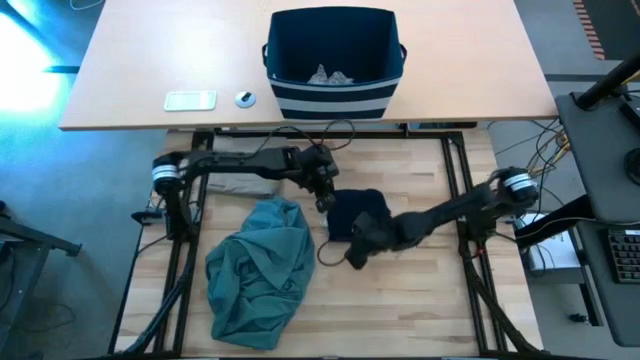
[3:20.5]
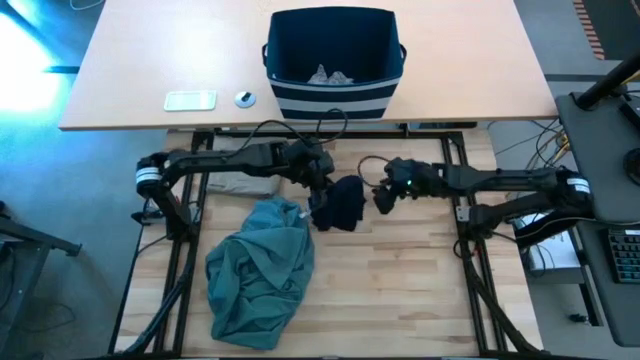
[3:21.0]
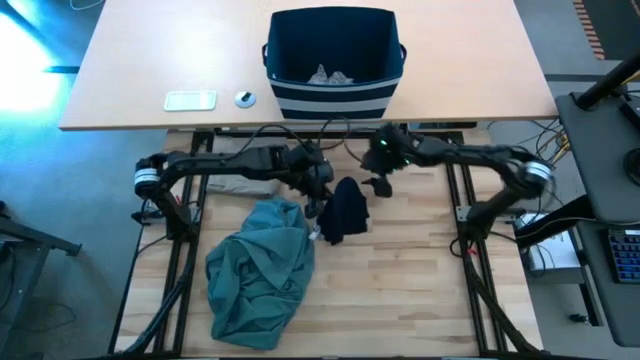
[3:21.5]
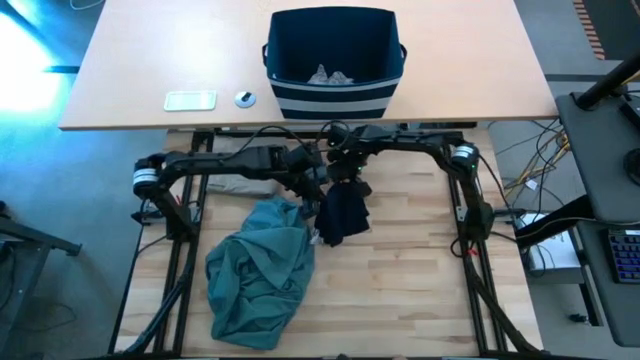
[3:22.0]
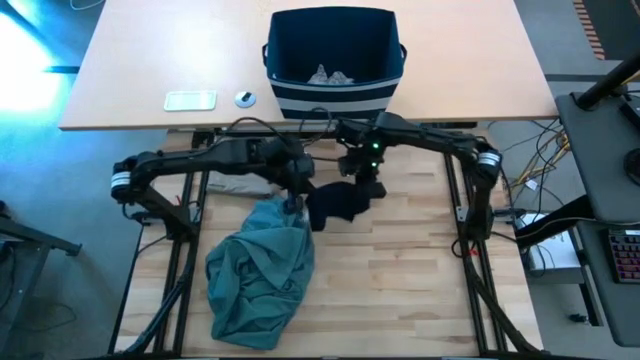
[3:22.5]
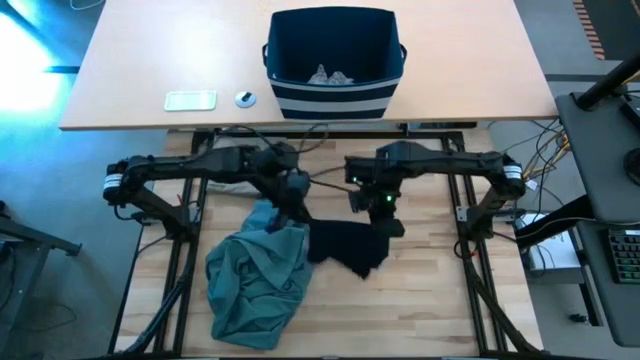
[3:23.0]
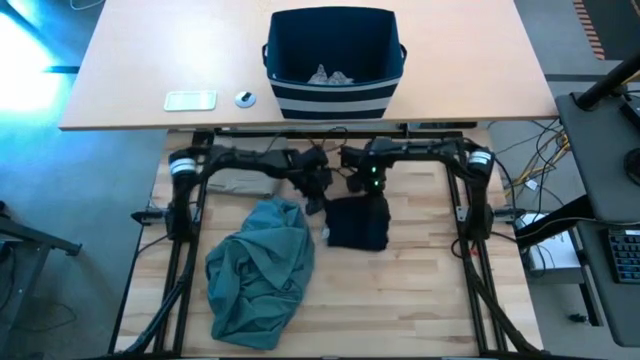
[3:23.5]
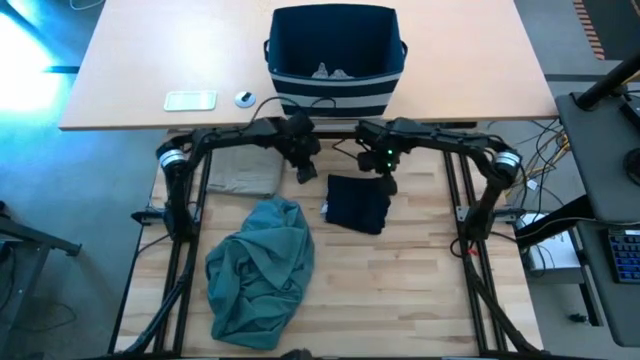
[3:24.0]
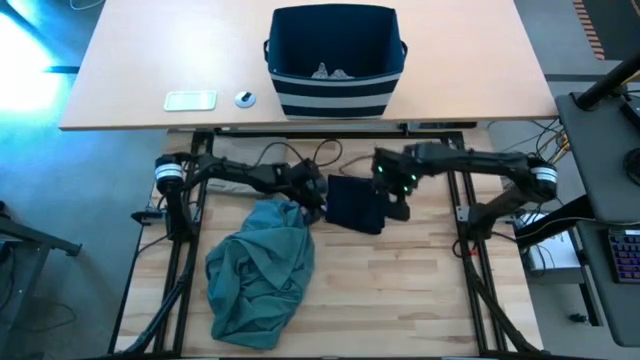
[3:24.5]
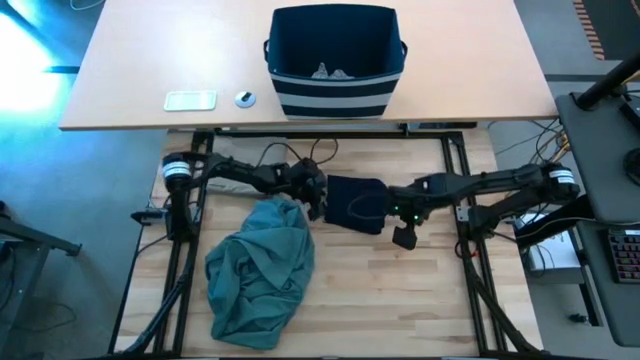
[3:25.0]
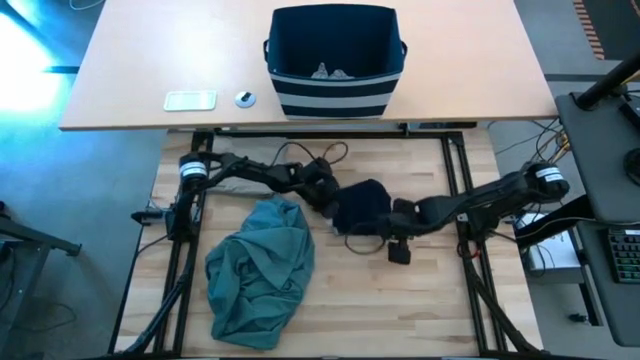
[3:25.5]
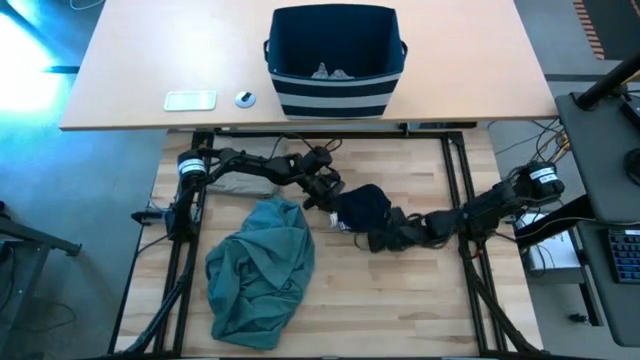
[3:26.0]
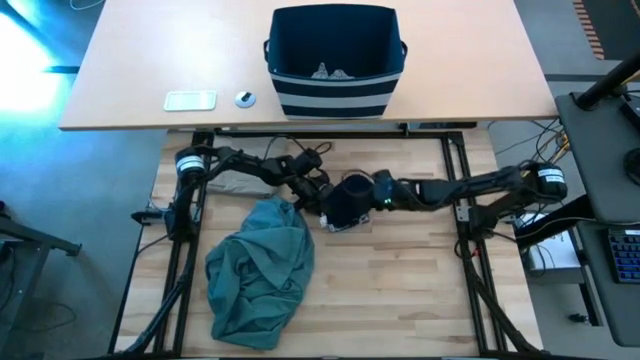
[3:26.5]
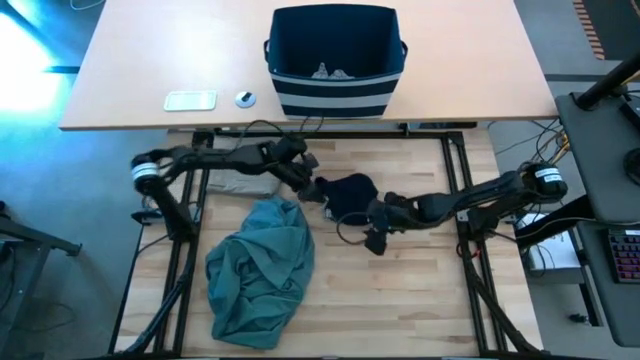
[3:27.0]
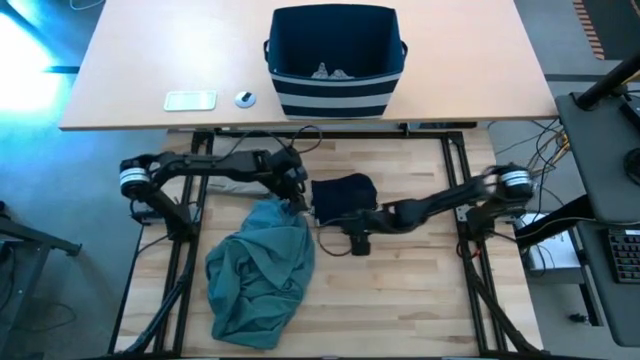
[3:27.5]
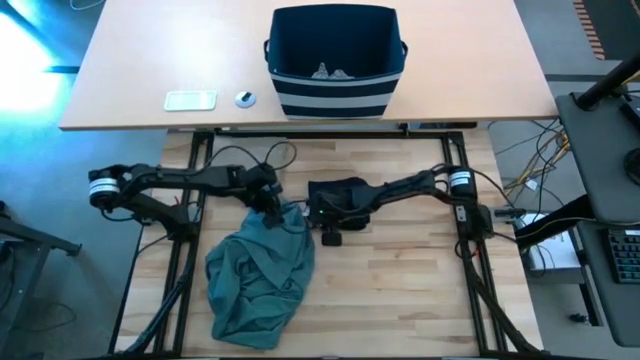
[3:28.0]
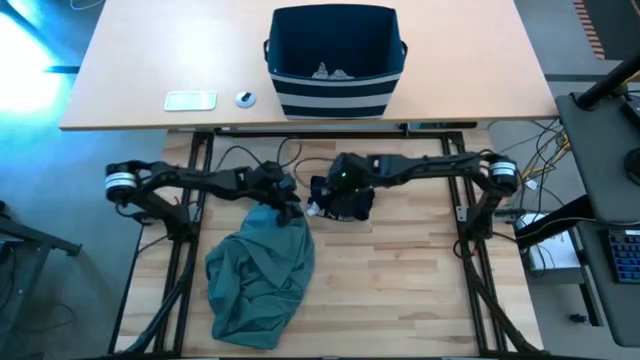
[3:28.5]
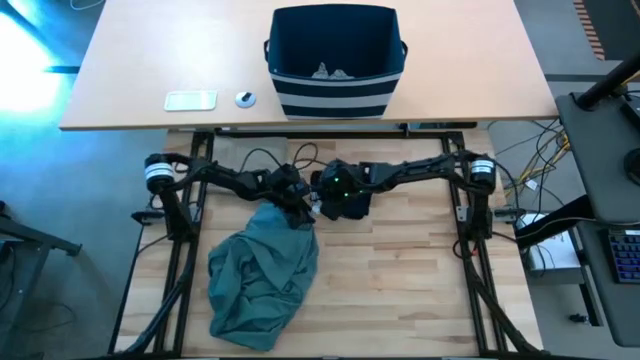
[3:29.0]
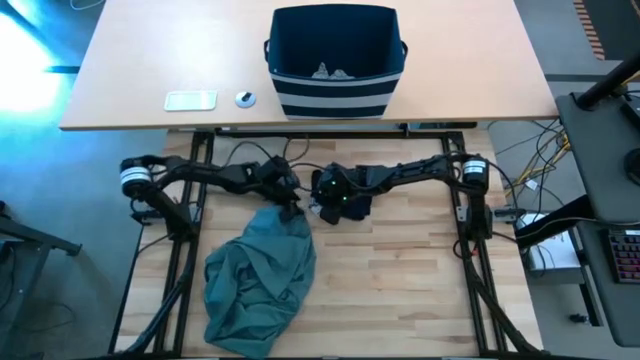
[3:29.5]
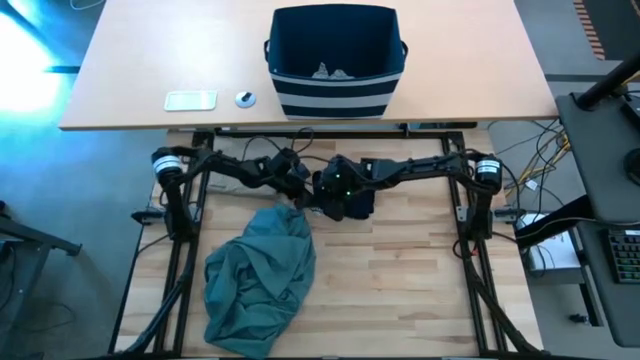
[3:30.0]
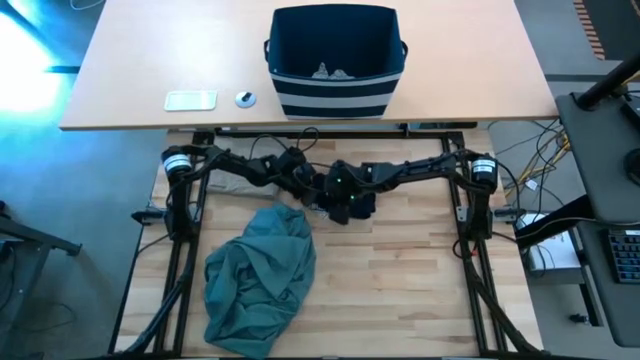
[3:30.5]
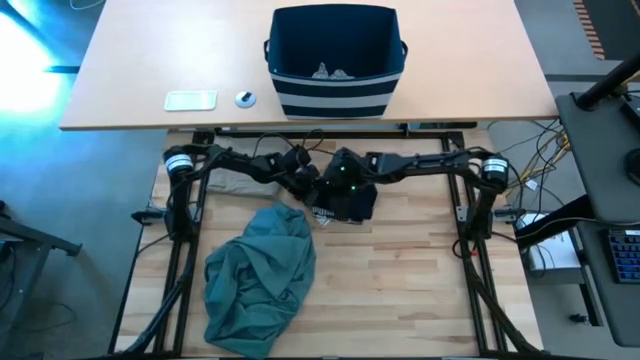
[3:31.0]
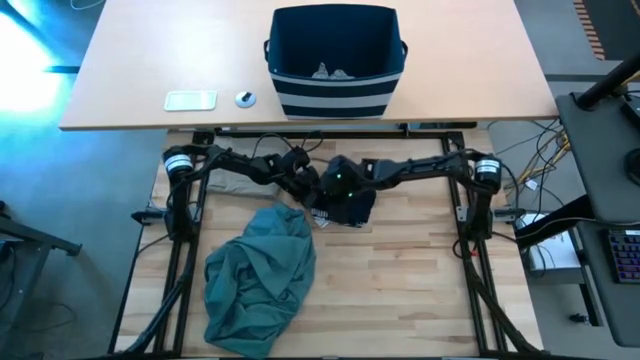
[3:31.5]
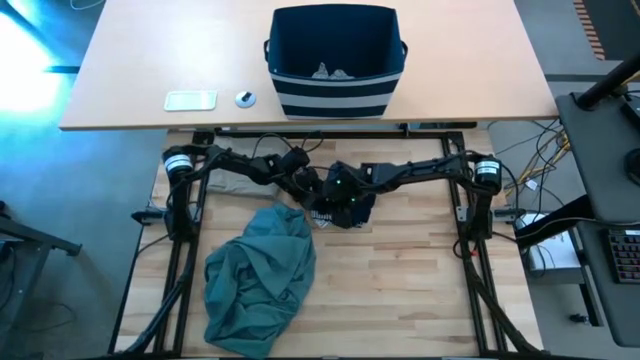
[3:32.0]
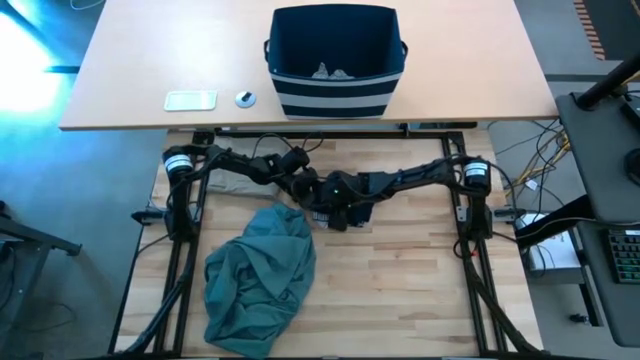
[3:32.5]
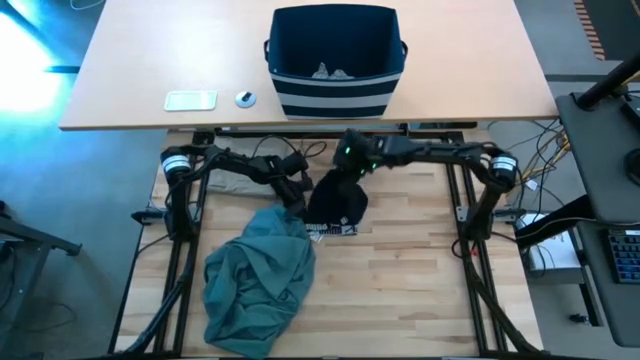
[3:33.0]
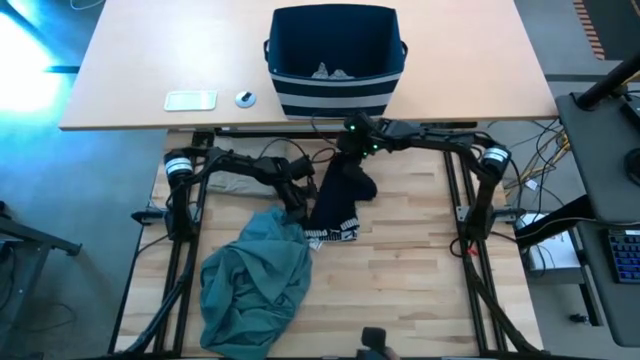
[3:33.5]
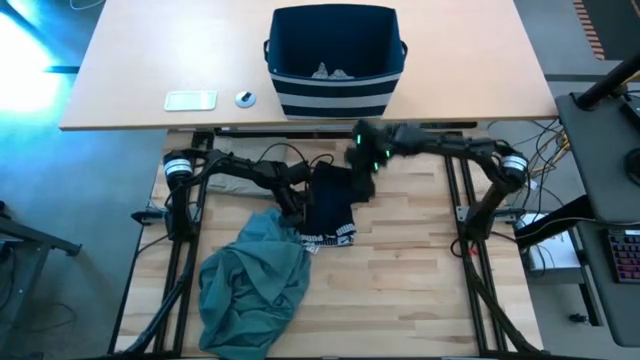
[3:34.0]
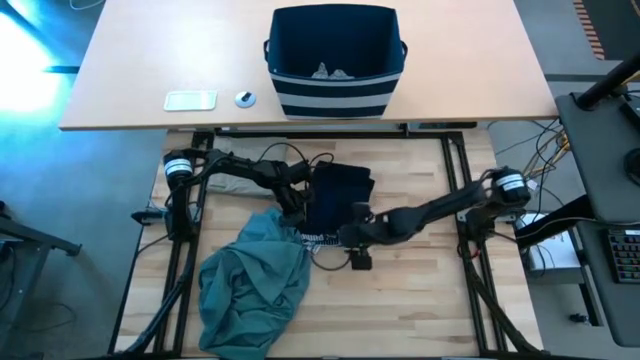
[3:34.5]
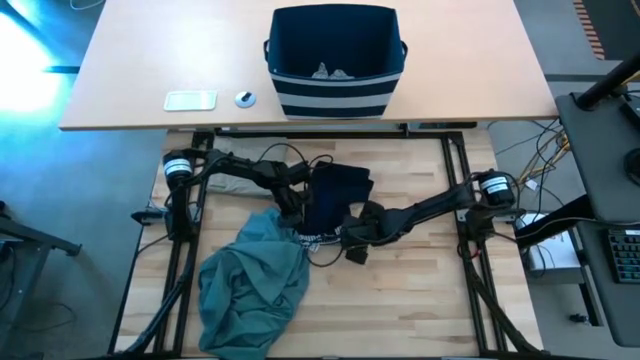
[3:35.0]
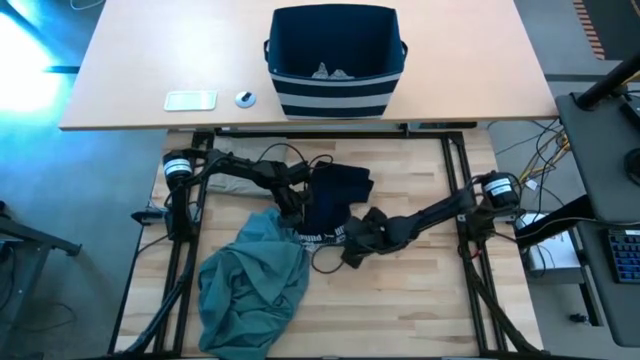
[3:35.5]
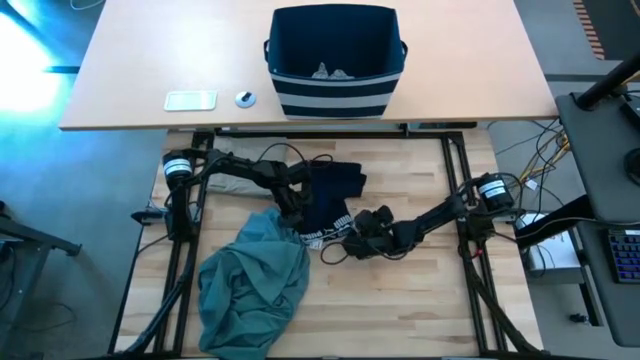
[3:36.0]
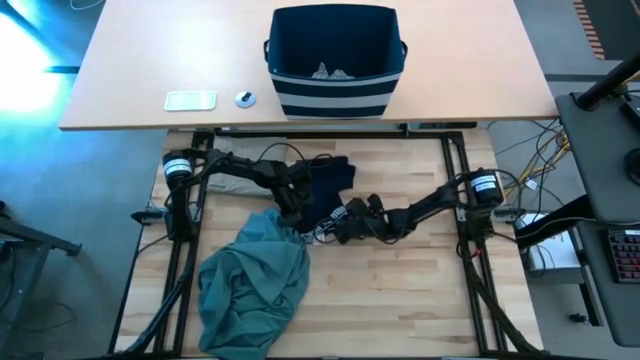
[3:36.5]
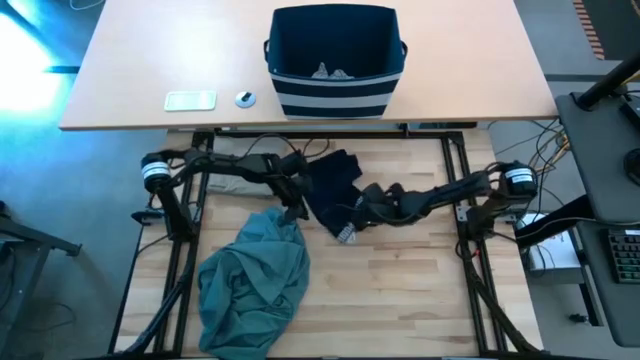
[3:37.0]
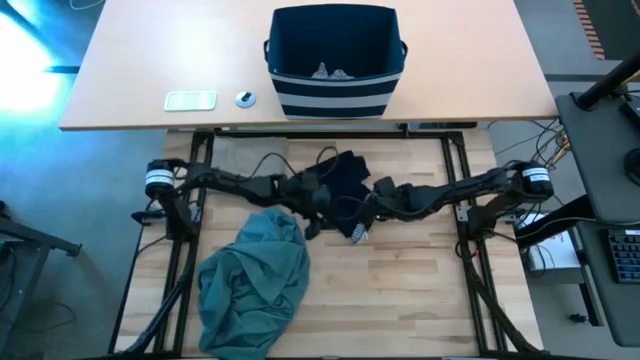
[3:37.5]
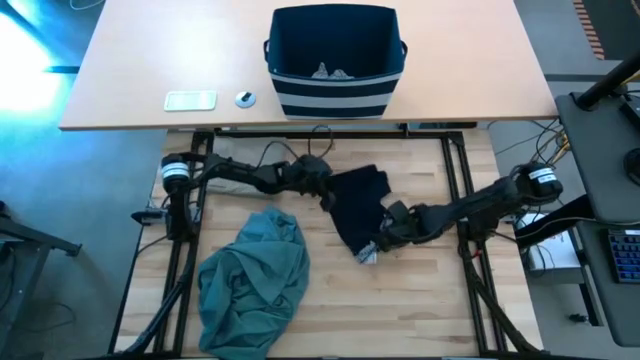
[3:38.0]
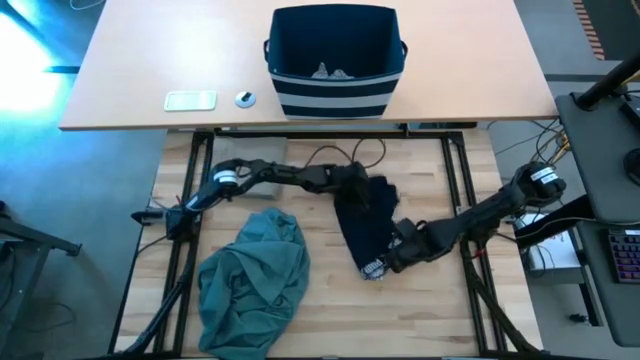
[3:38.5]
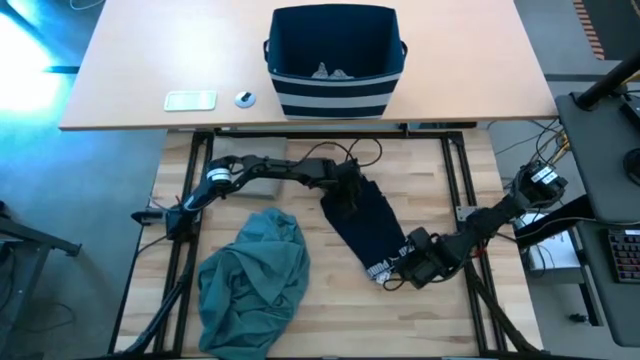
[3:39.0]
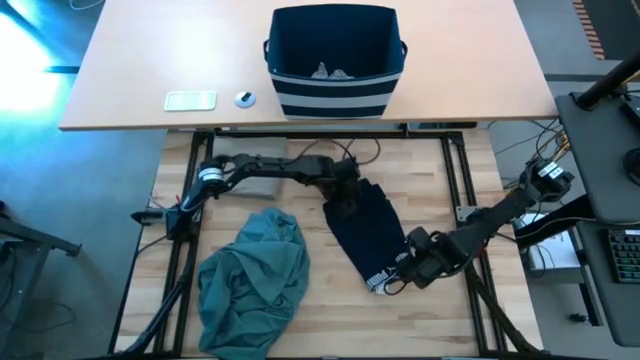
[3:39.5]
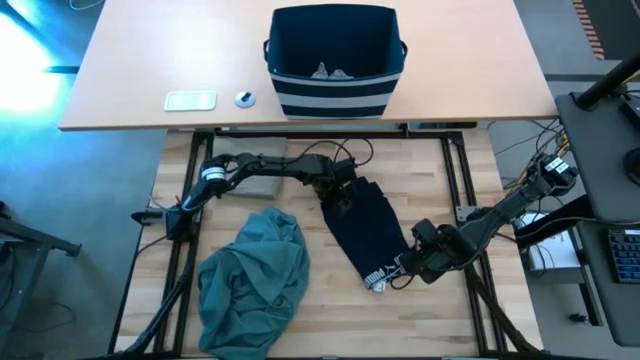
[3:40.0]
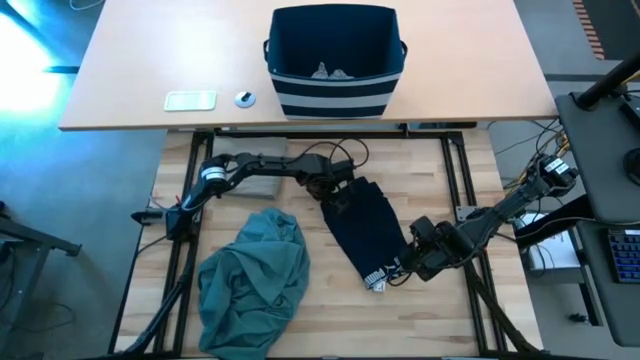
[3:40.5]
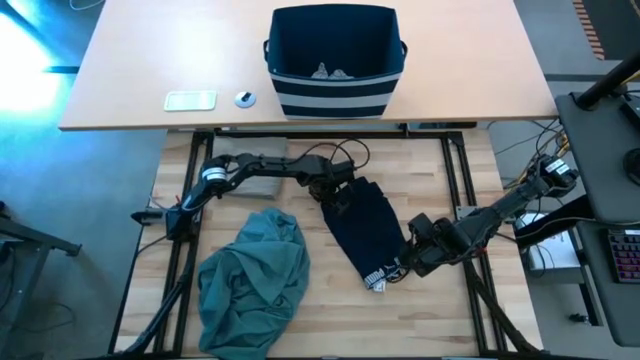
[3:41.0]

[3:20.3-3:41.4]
Task: Fold Laundry from Bin
Fold the black underwear
